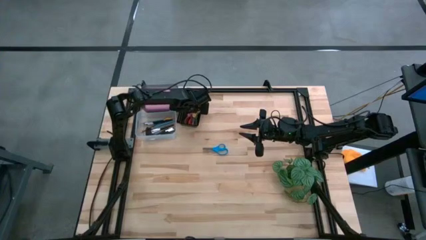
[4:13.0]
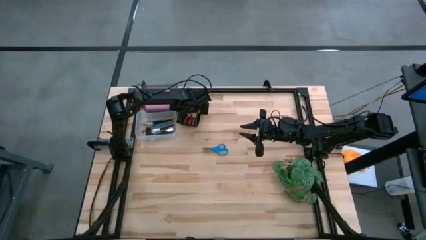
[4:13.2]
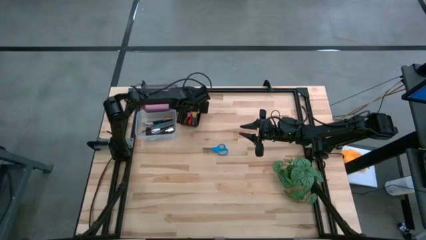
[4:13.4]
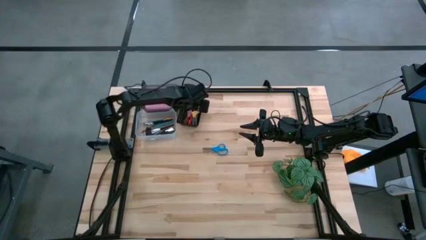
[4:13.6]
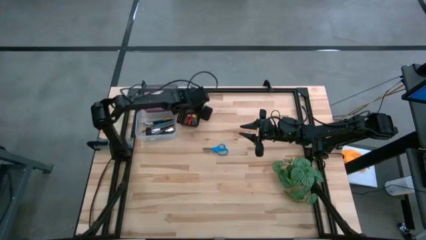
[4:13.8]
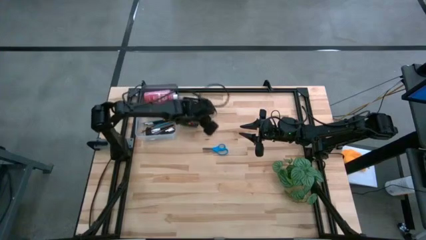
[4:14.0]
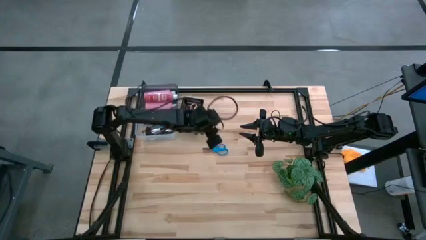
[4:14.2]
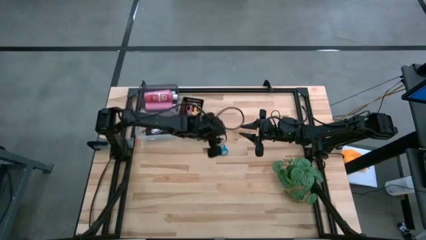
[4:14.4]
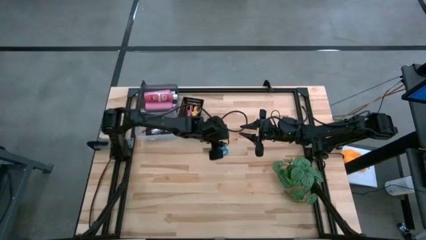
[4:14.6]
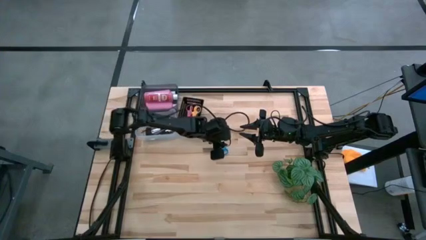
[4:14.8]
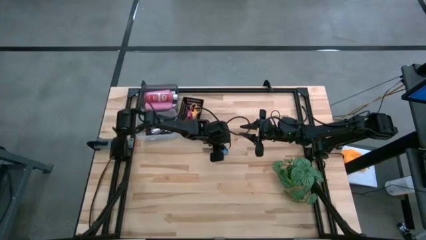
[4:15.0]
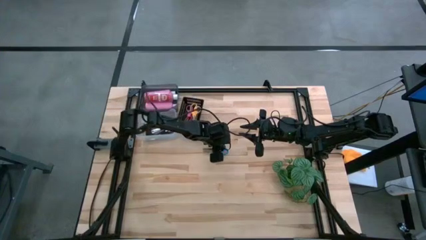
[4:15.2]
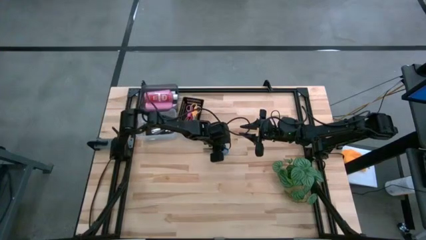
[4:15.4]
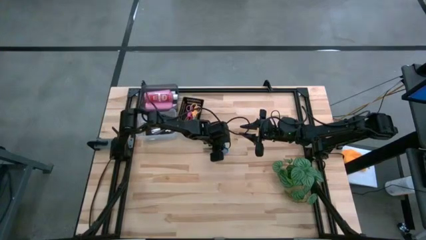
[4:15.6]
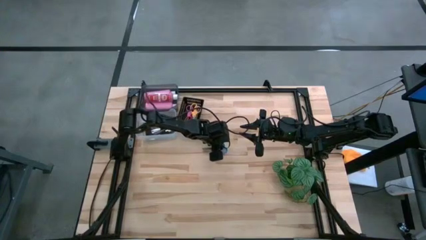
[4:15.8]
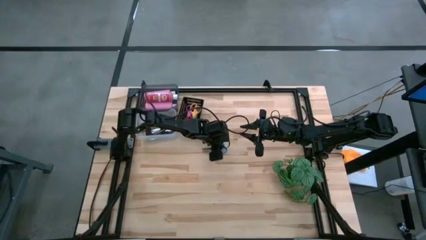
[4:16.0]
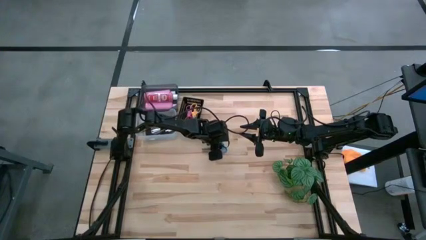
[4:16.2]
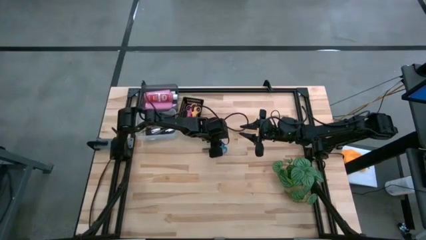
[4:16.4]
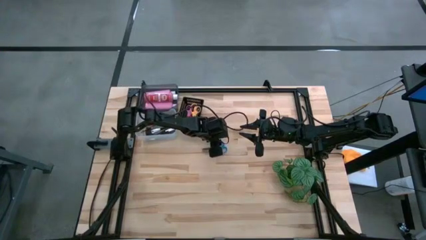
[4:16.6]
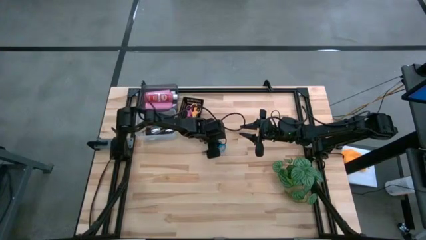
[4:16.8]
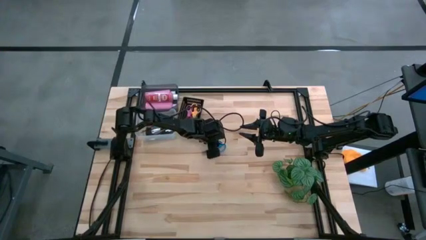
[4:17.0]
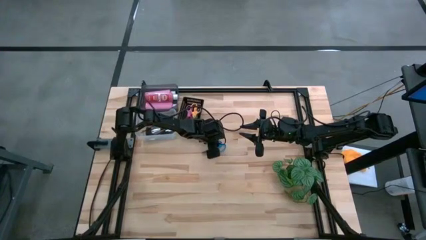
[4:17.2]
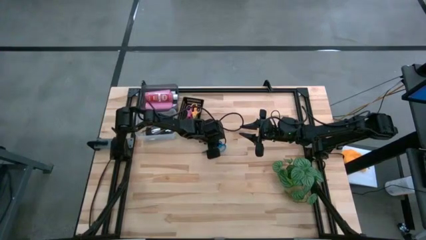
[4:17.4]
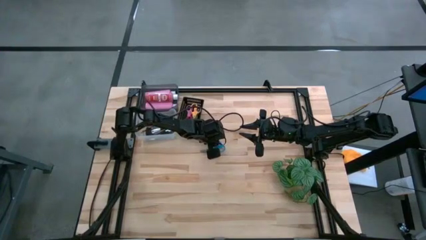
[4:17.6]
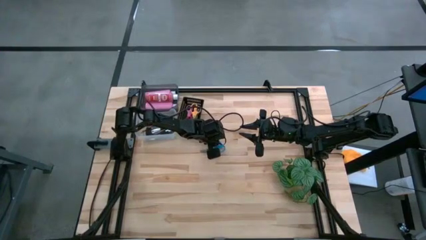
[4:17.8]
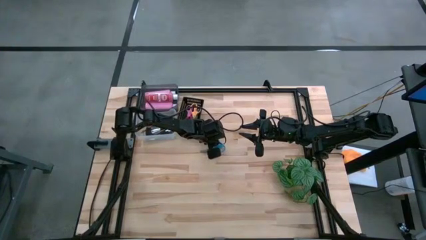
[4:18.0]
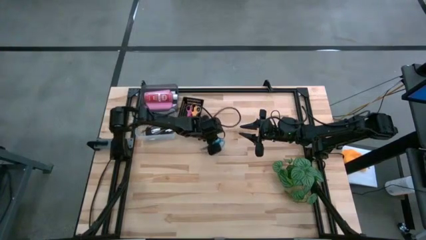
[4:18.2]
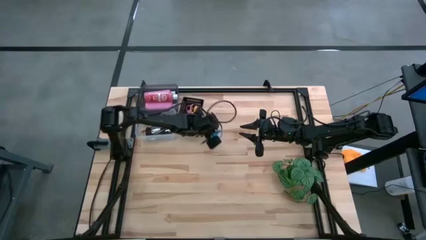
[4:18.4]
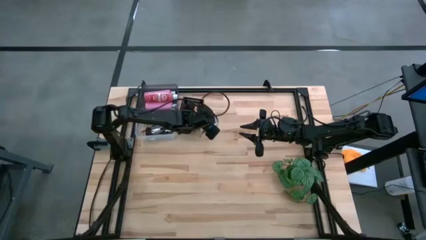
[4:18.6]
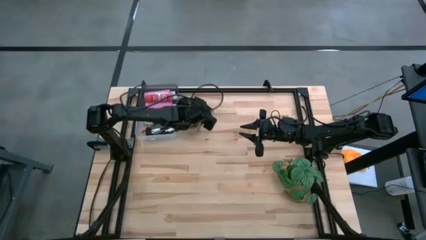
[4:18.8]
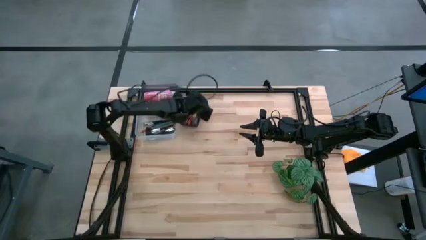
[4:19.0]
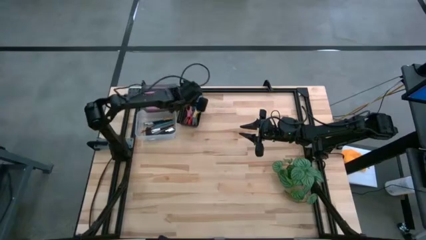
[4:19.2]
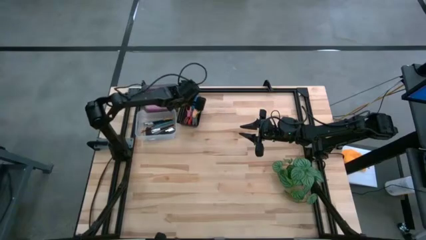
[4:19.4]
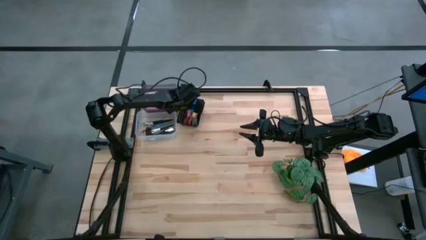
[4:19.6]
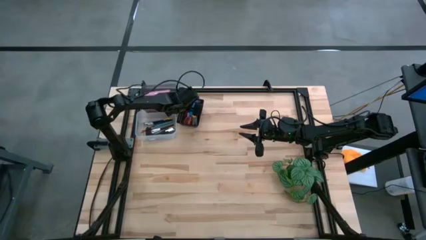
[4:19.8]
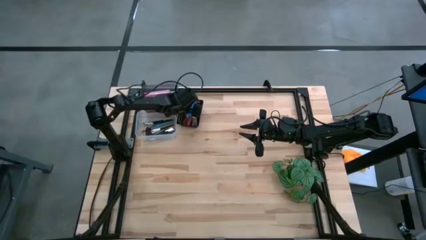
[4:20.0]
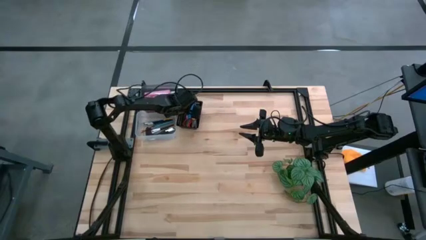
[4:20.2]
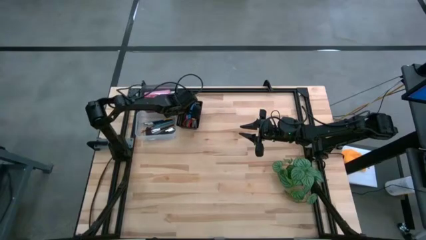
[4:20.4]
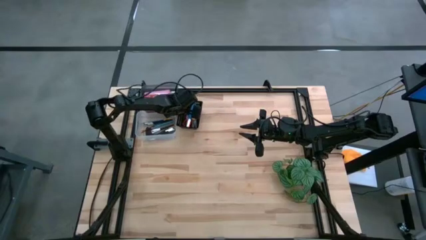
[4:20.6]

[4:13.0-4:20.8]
Task: Pick & Place Paint Supplies
Put the blue scissors into the right black bin

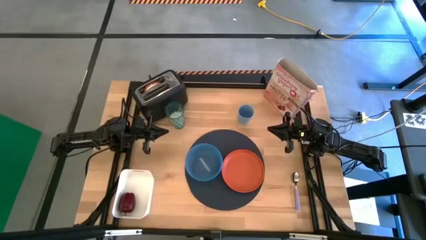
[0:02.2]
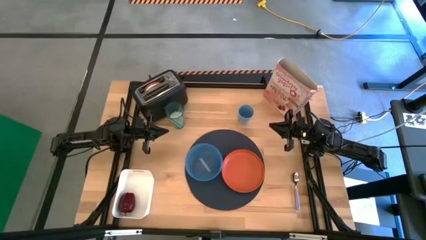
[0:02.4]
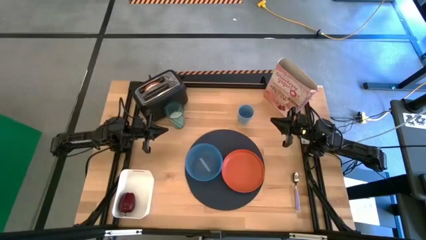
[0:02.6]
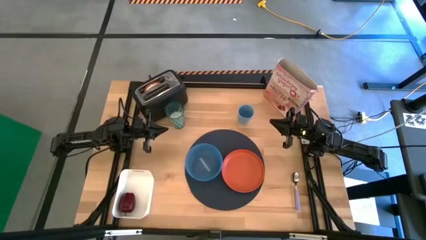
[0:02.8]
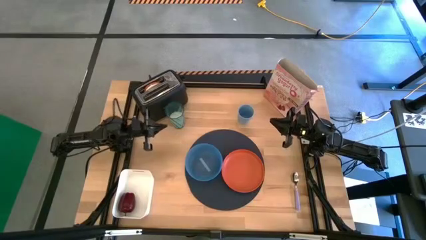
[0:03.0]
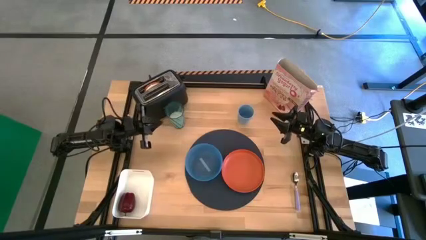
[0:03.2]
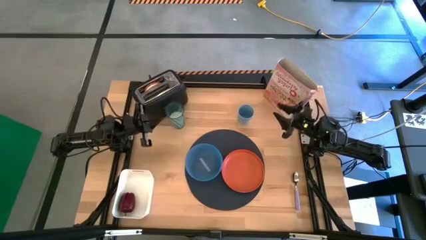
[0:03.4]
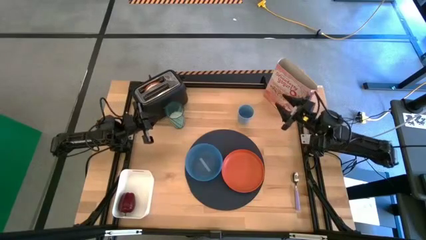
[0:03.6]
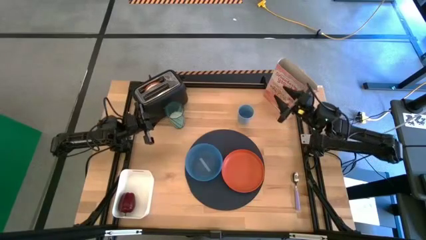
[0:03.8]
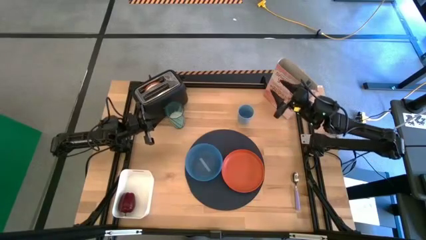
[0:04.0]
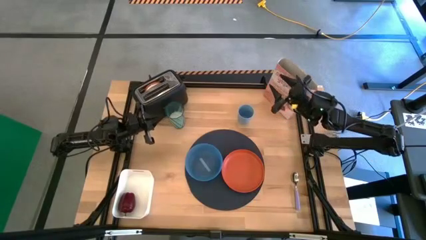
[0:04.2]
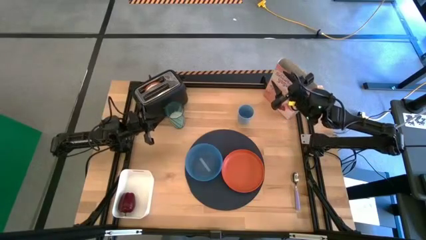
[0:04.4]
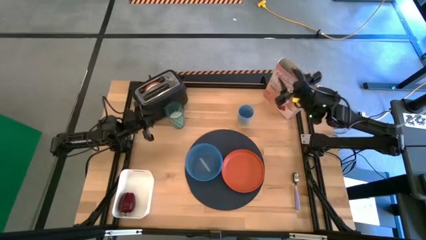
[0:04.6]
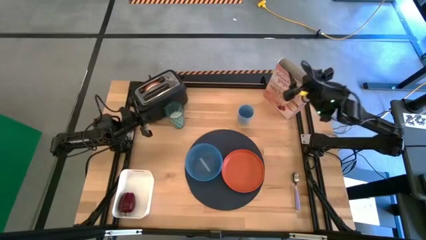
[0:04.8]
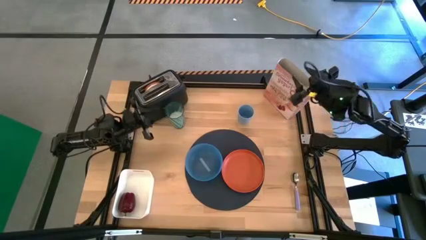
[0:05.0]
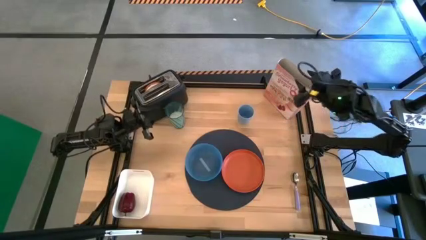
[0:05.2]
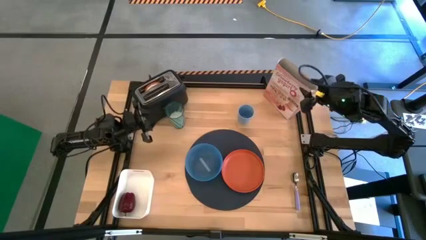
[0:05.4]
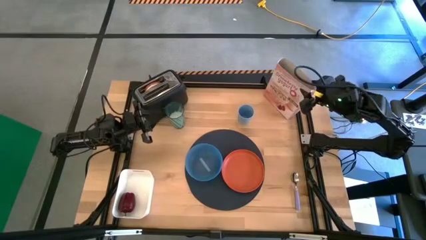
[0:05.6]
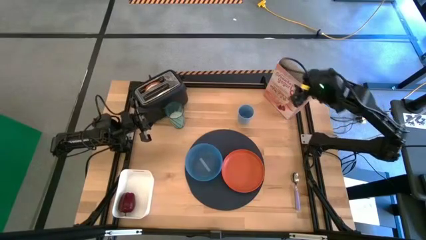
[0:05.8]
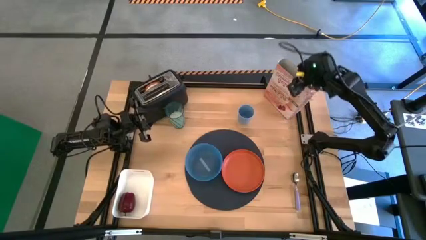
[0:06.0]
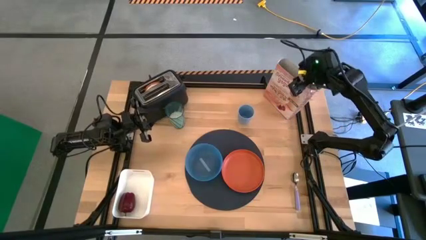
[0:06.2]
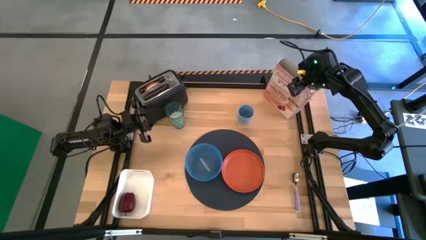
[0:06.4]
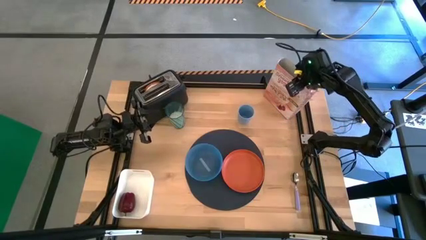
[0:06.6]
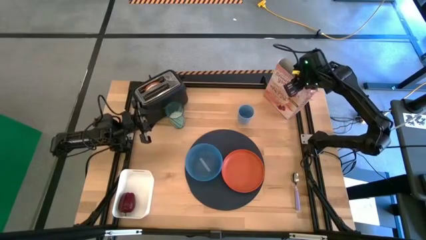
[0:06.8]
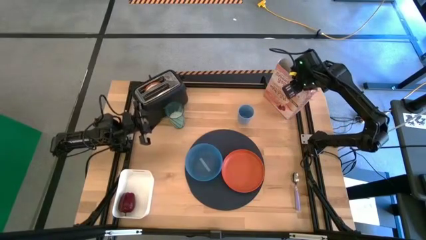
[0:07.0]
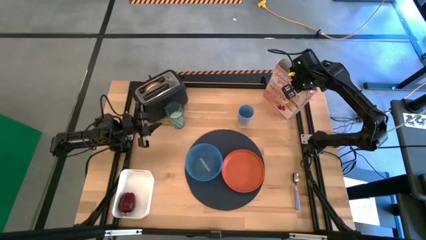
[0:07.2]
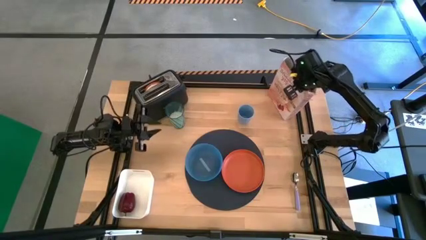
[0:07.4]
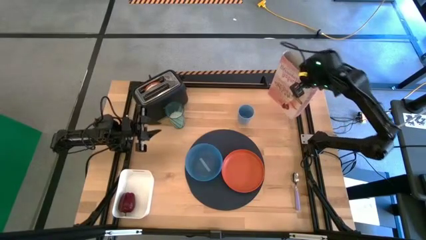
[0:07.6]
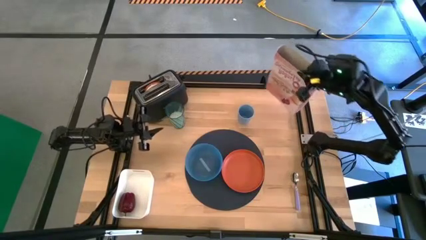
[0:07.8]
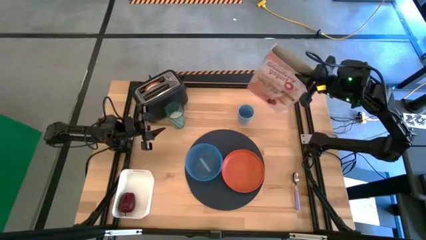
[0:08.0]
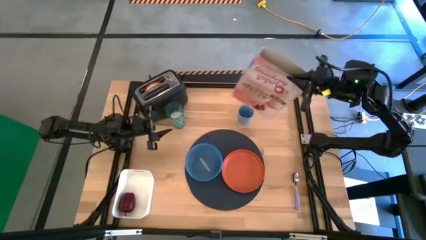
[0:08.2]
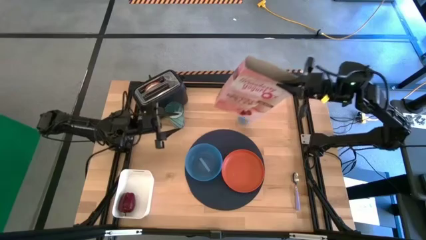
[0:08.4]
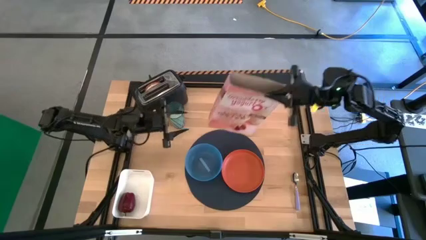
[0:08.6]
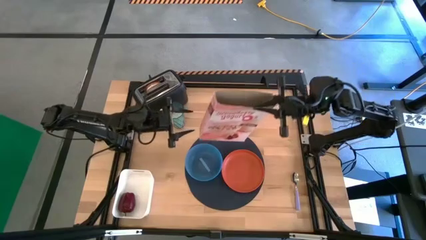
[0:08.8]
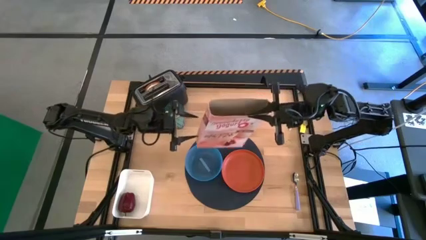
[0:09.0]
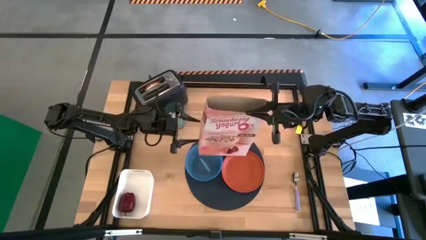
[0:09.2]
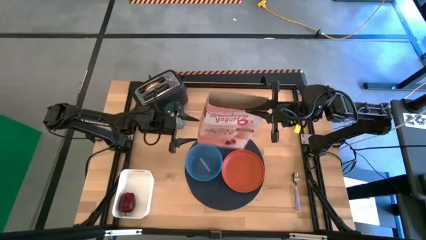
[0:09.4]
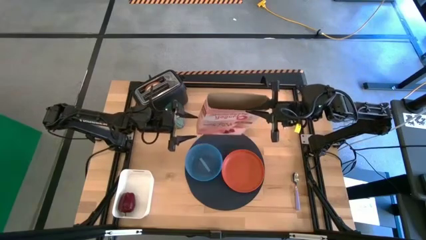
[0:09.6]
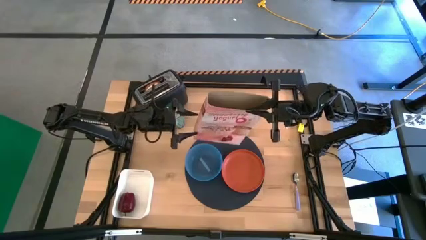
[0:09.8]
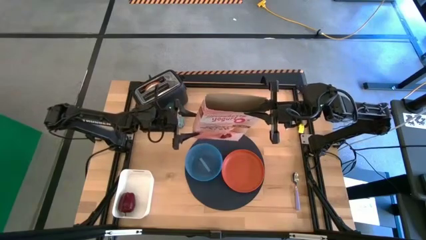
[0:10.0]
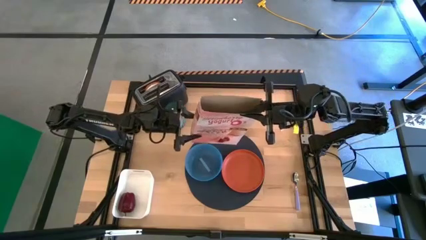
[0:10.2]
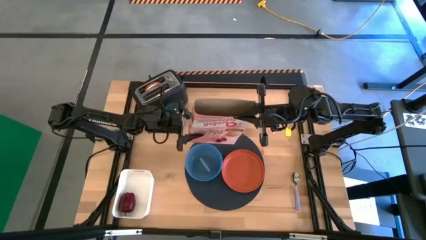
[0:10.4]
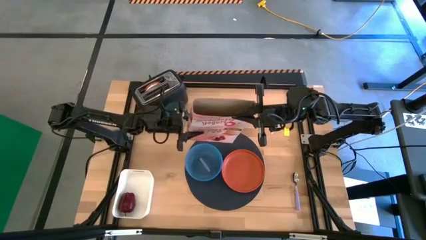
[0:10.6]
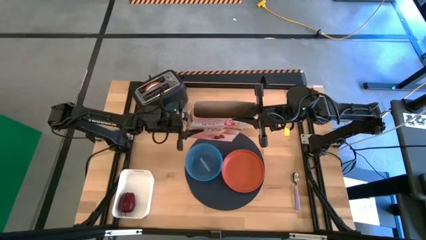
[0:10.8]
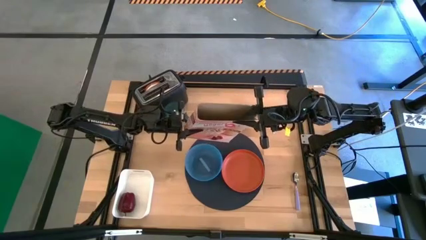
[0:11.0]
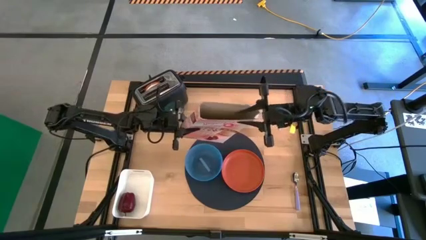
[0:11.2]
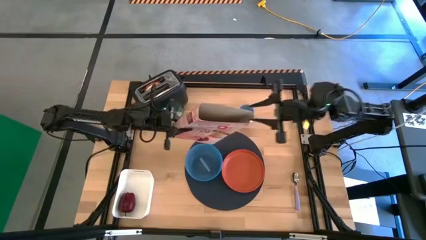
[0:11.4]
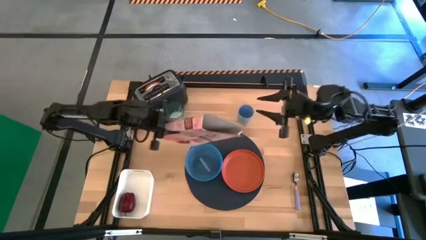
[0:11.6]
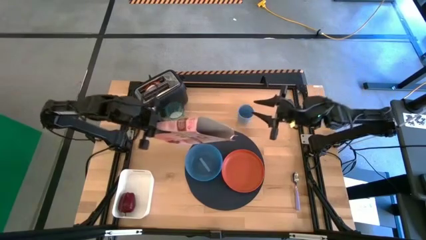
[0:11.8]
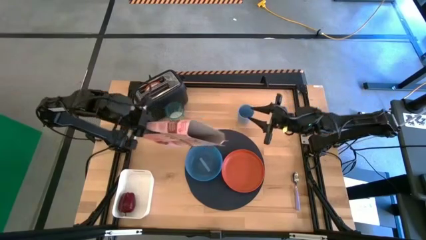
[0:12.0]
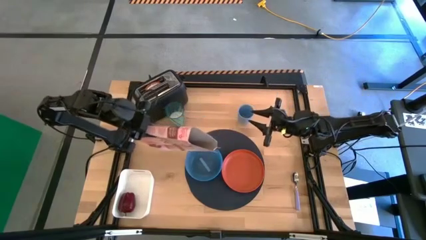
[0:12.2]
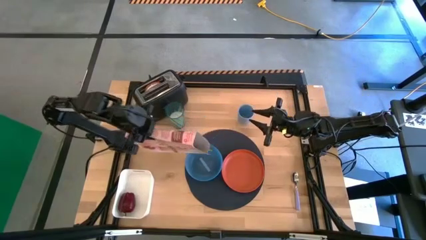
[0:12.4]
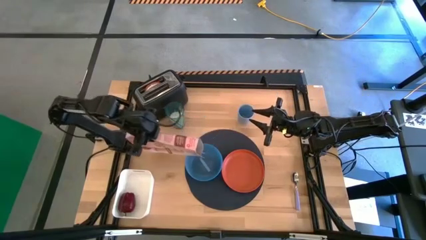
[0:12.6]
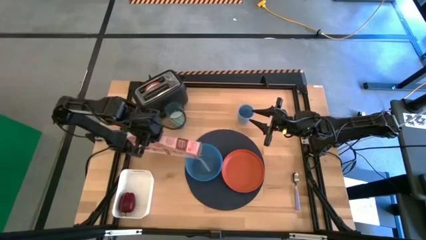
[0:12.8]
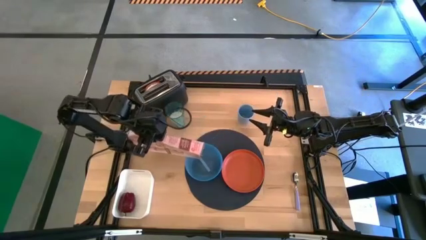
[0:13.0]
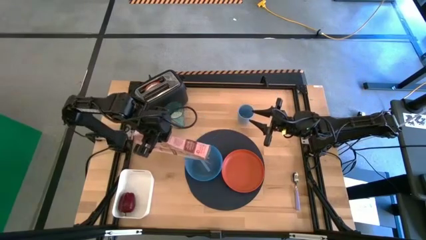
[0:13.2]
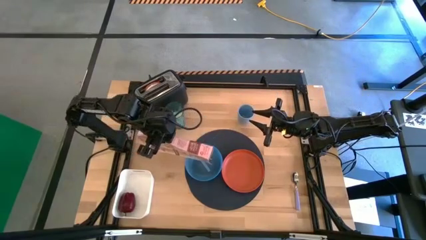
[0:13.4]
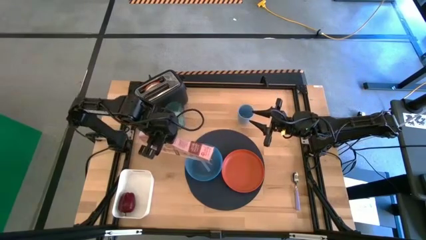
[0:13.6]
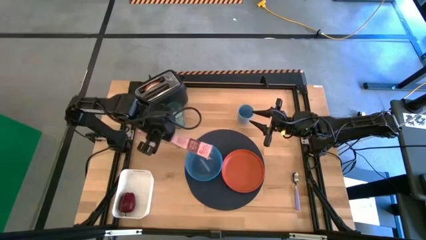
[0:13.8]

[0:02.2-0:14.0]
Task: Arrange a breakfast setting
Pour the cereal from the cereal box into the bowl
